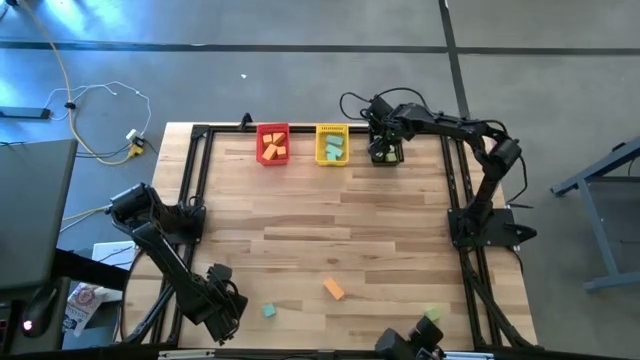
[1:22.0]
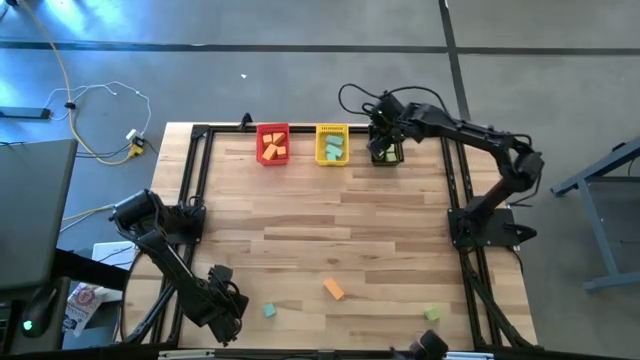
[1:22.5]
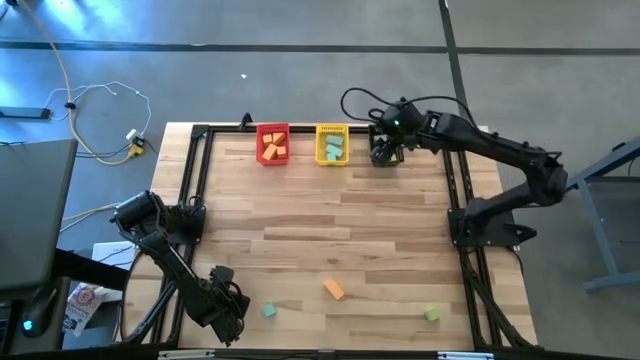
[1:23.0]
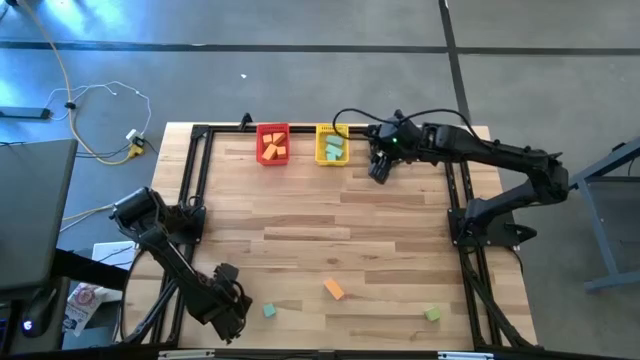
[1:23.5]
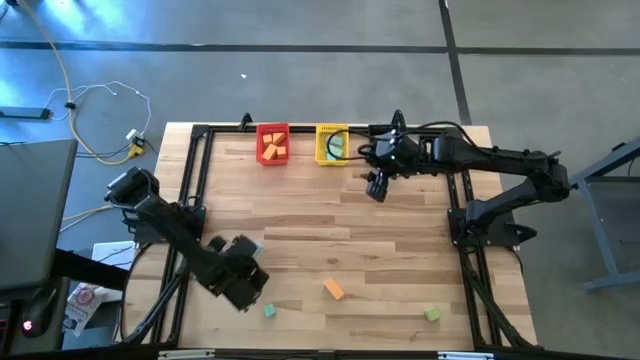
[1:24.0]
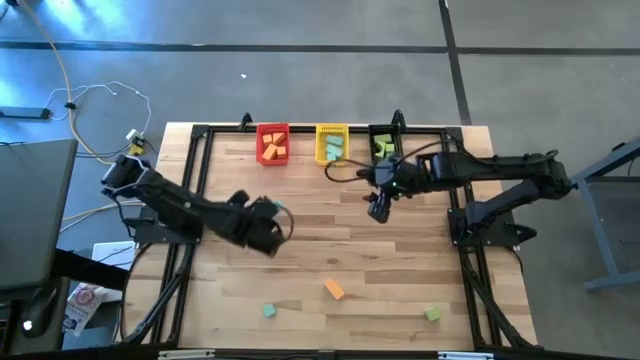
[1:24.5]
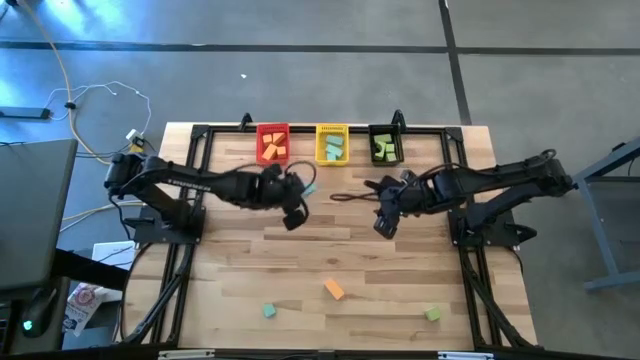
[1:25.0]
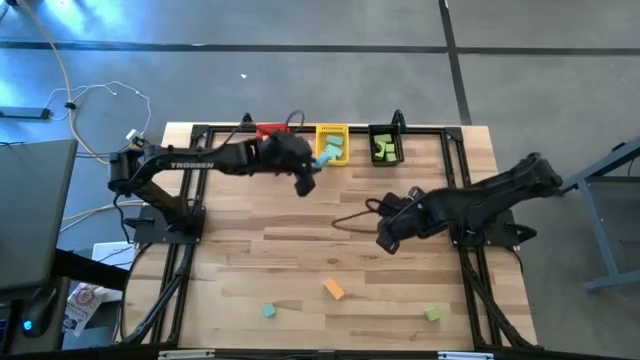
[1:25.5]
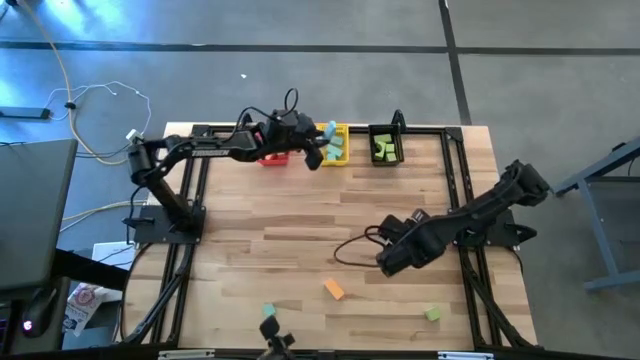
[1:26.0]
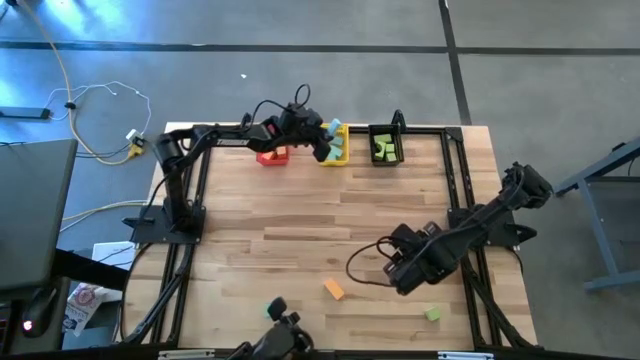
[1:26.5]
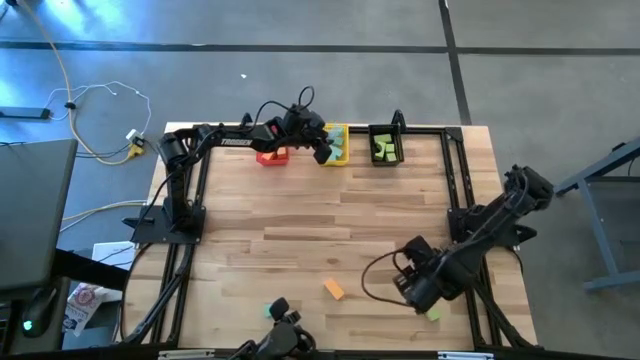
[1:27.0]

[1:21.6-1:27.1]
Task: Sort & place blocks by color
Put the blue block into the yellow bin

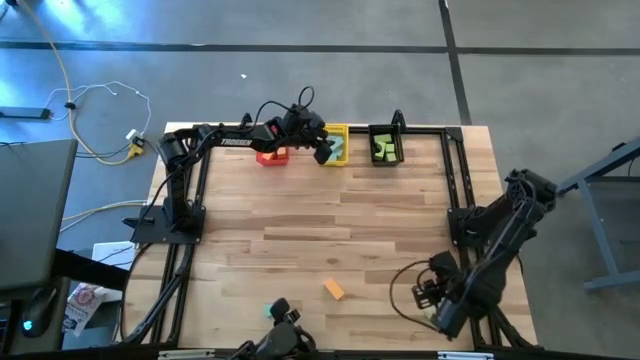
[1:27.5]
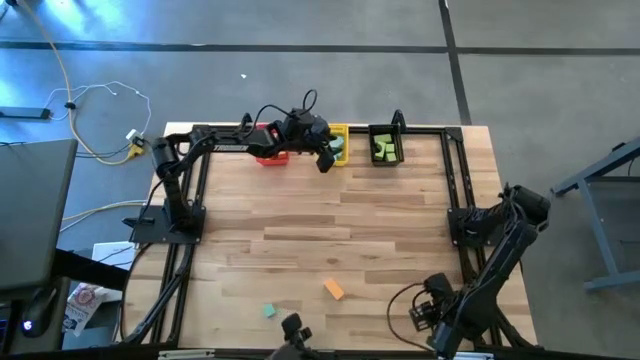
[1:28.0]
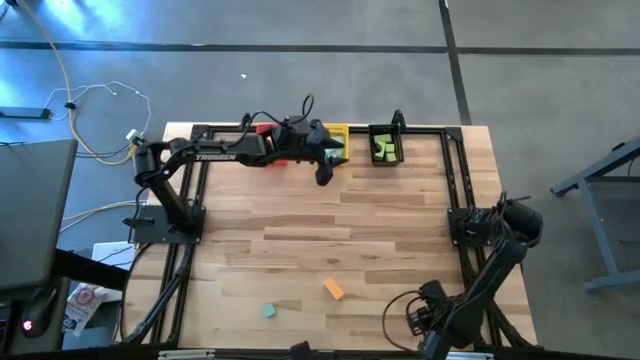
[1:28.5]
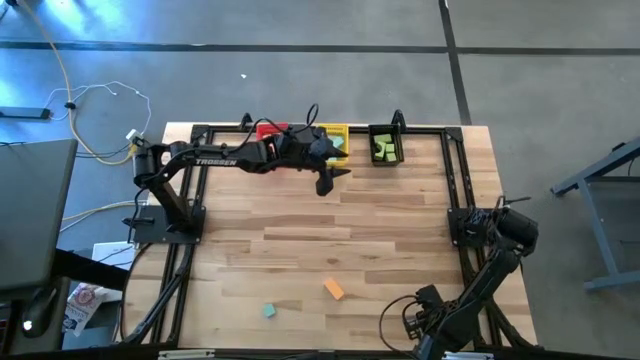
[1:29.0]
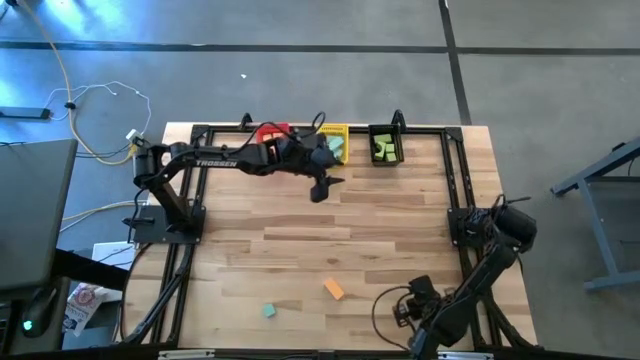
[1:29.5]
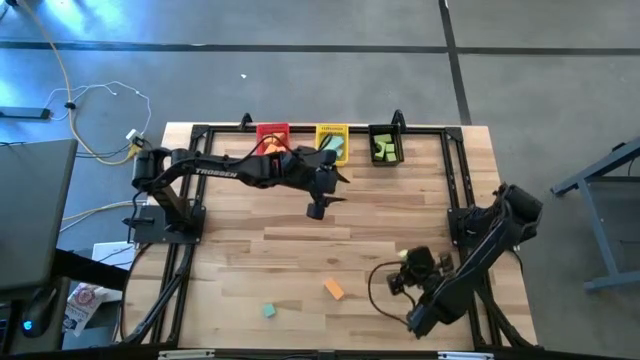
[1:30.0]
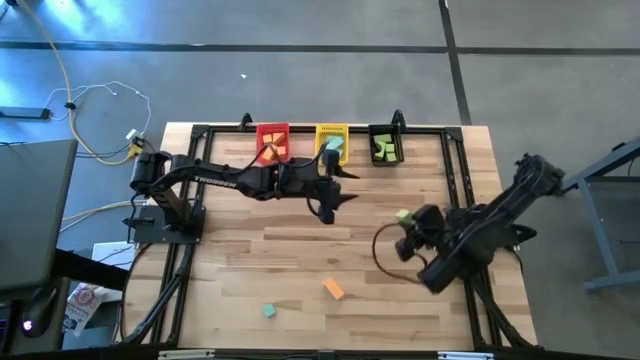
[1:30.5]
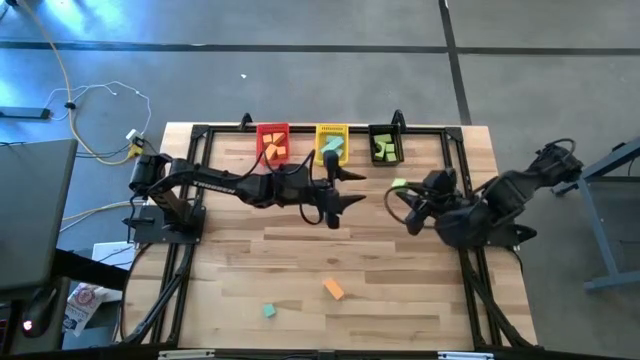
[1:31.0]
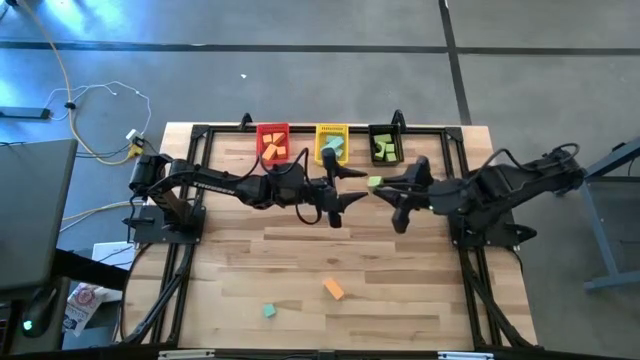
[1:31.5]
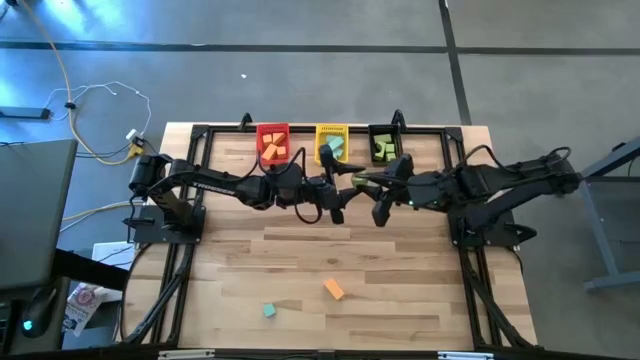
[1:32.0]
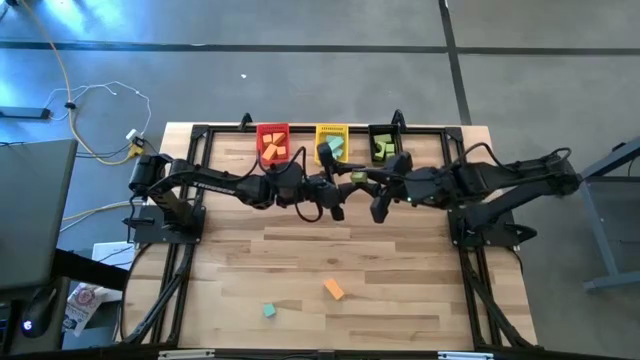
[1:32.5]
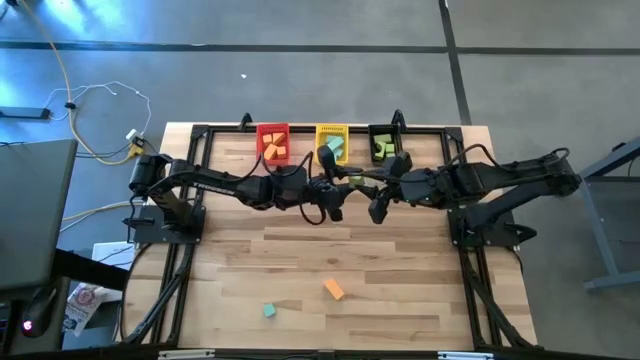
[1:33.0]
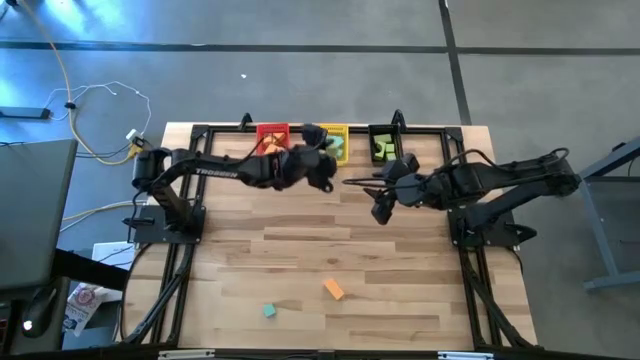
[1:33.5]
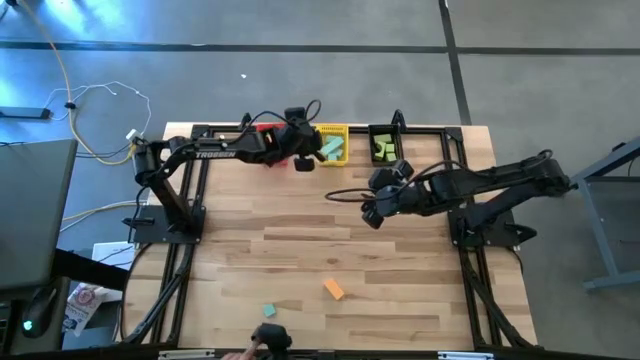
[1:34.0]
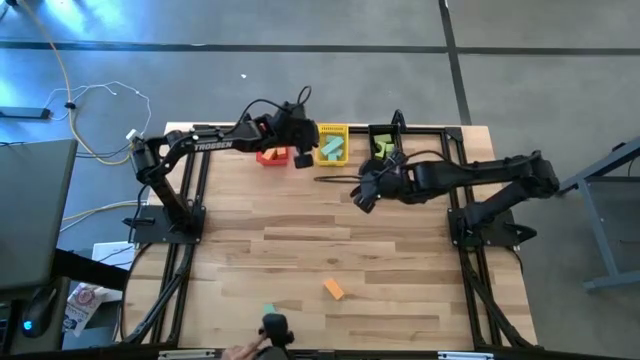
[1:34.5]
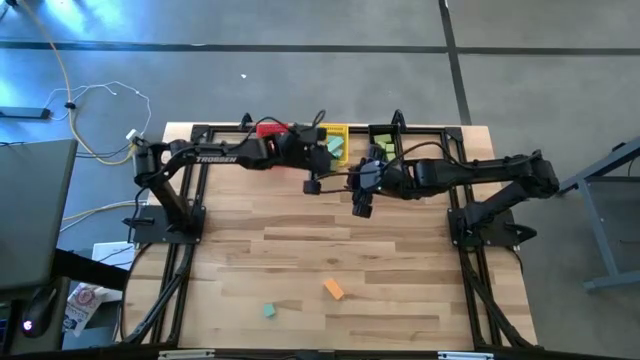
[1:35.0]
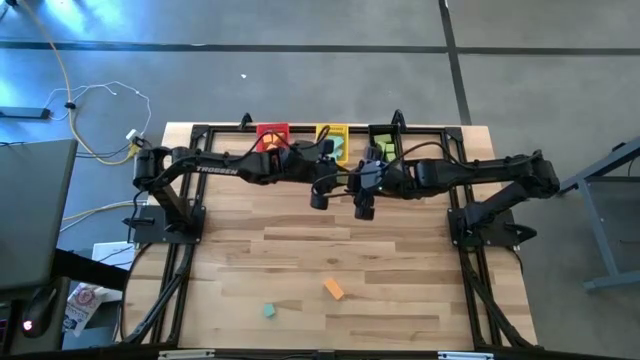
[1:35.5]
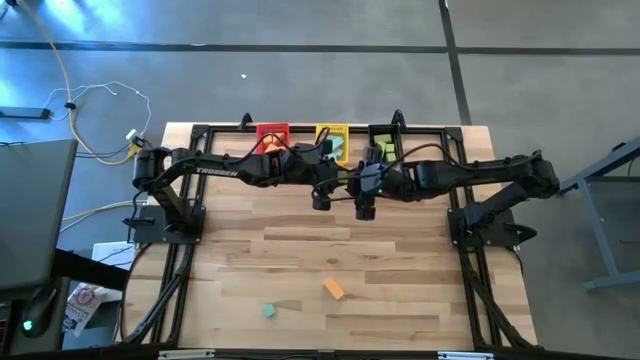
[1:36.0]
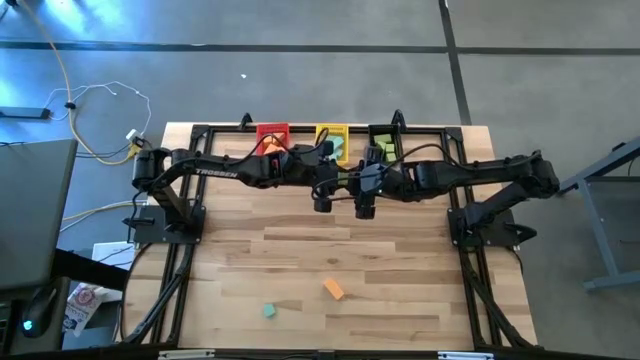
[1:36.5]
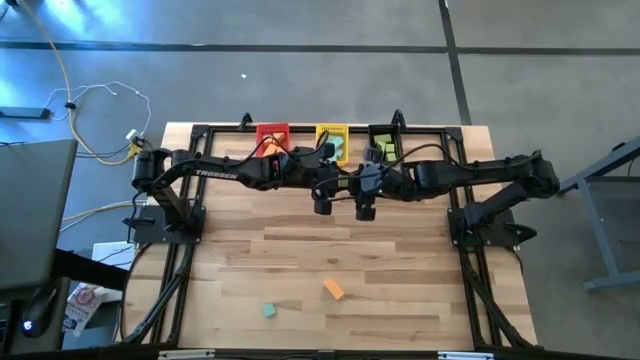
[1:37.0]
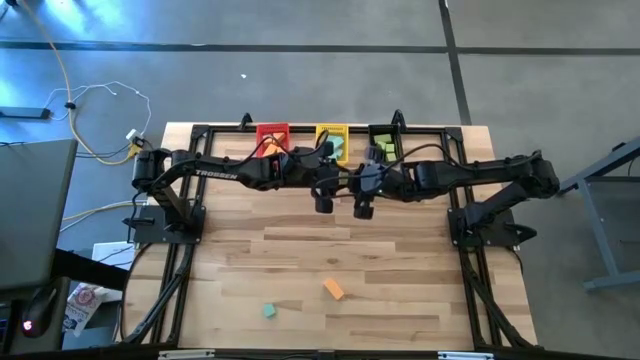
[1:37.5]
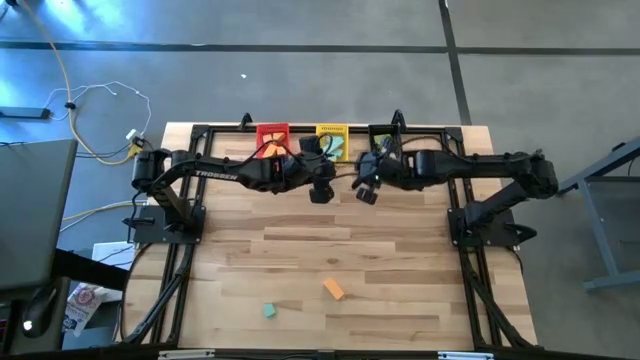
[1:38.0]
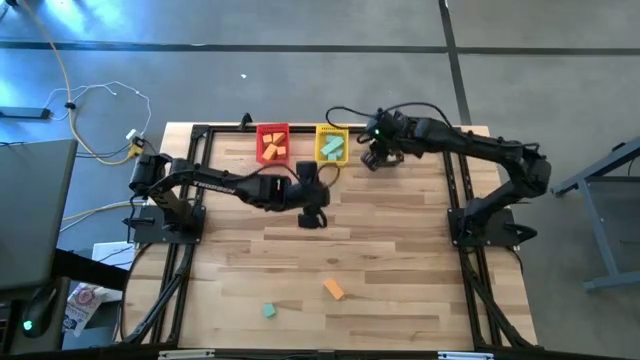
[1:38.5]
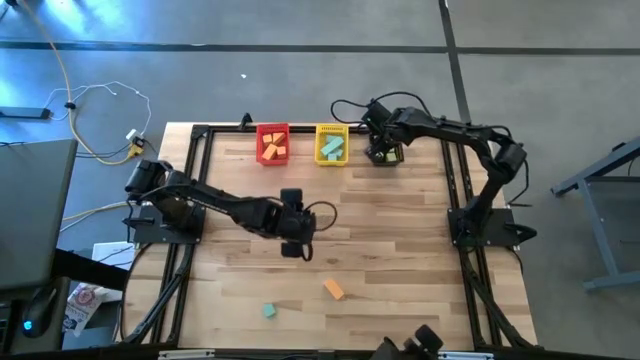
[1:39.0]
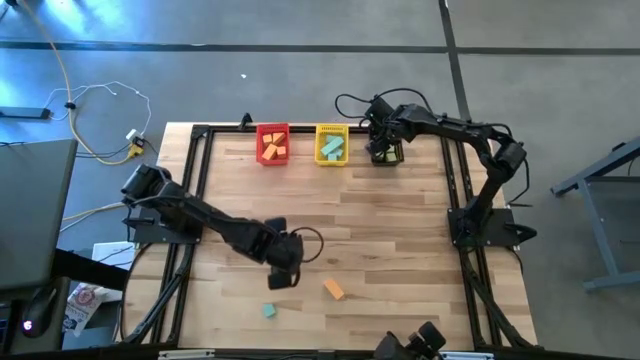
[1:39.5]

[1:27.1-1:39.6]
Put the green block into the black bin

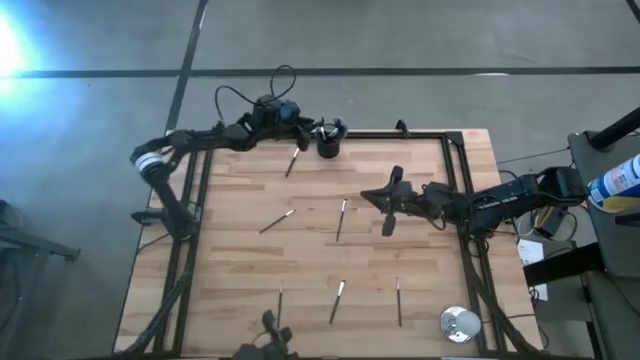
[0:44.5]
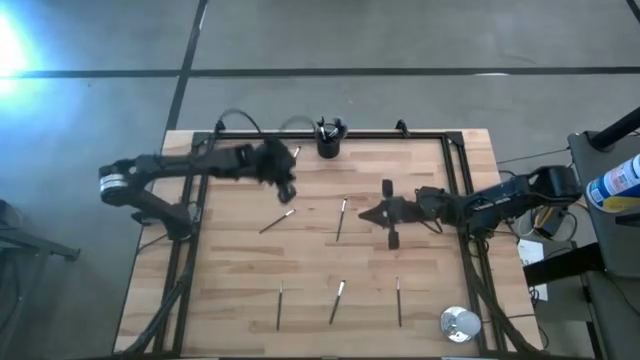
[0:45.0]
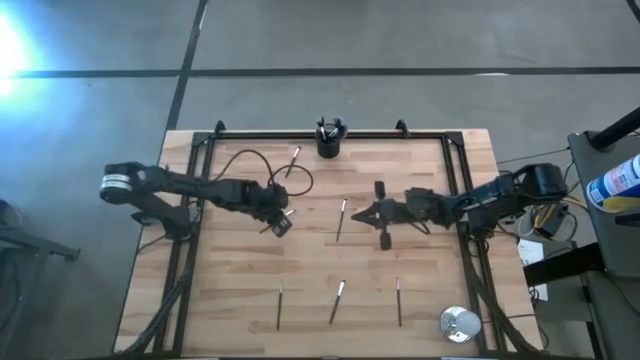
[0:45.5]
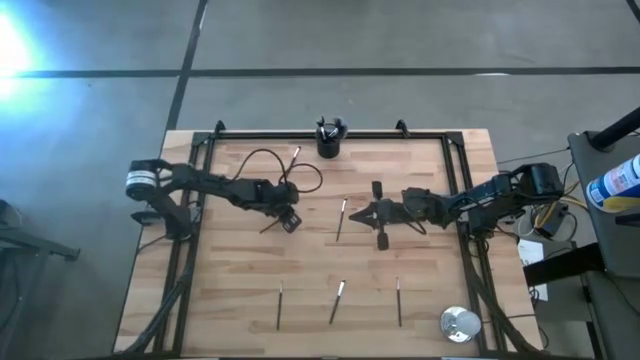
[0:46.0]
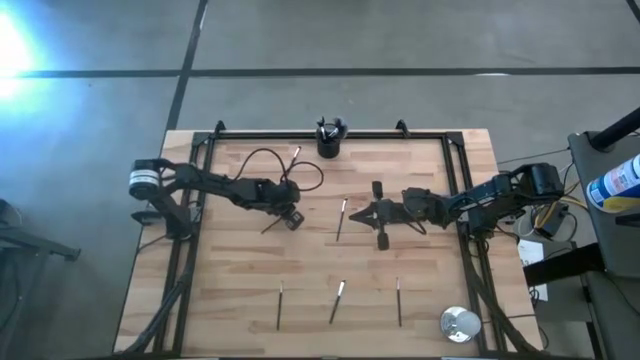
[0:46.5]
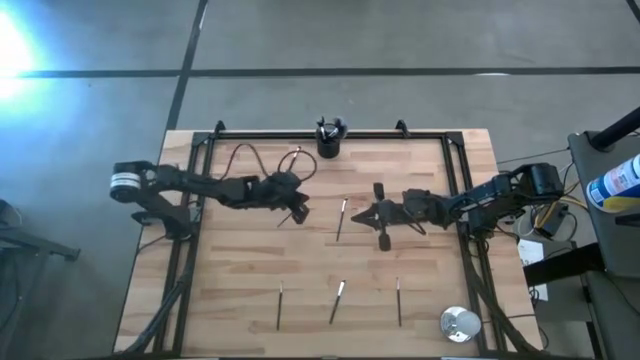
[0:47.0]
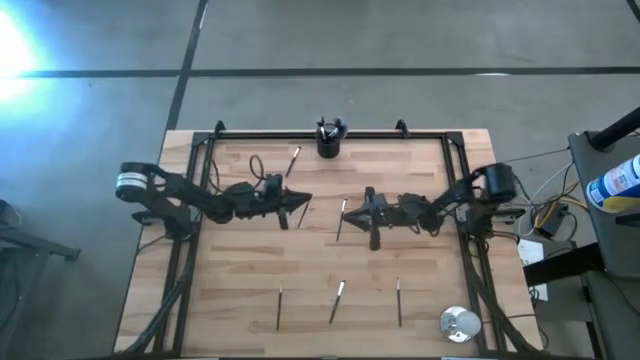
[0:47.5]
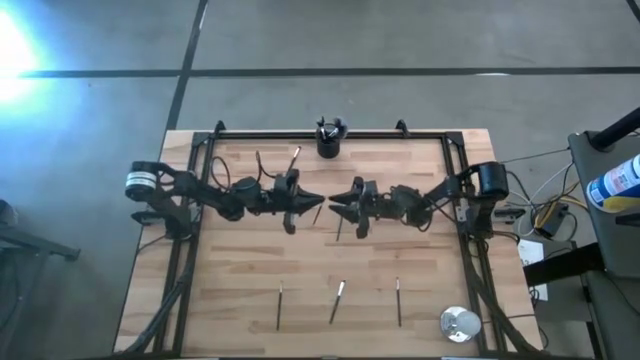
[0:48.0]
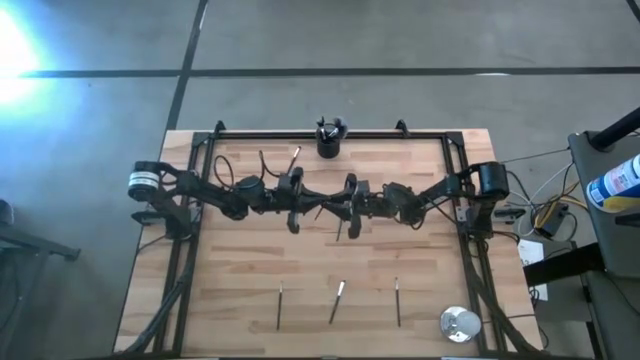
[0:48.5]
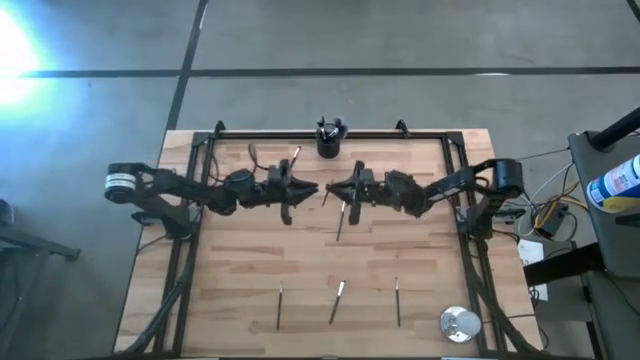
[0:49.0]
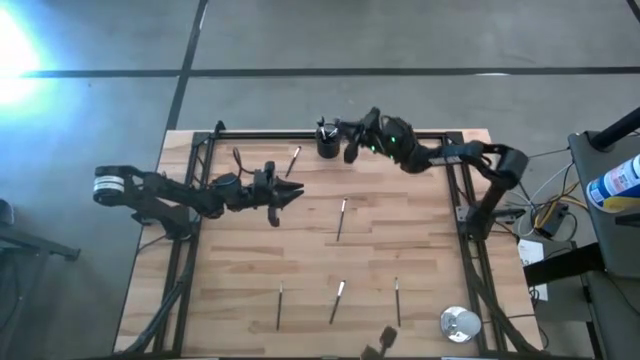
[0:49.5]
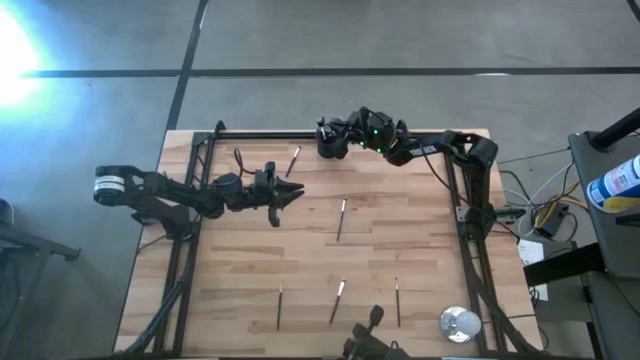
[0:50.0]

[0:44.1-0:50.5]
Task: Put items in baskets/containers
Put the black eyeshadow brush into the black pen holder
